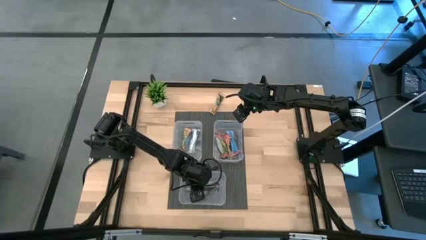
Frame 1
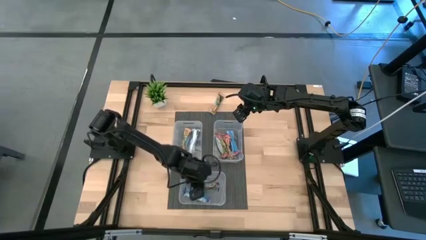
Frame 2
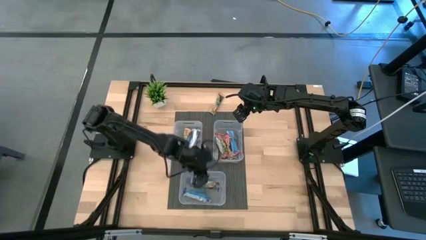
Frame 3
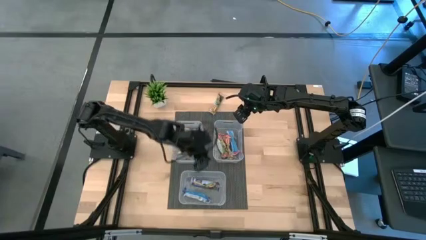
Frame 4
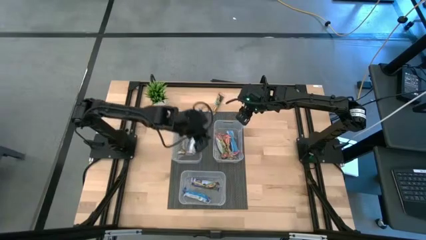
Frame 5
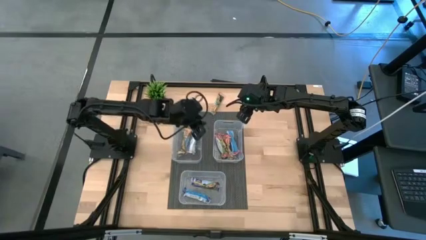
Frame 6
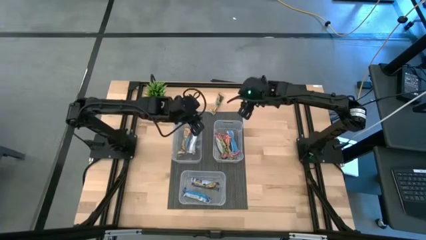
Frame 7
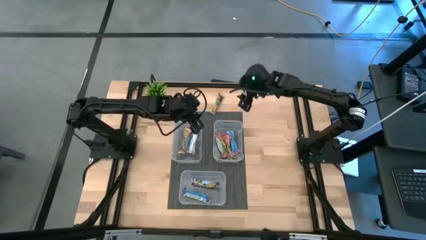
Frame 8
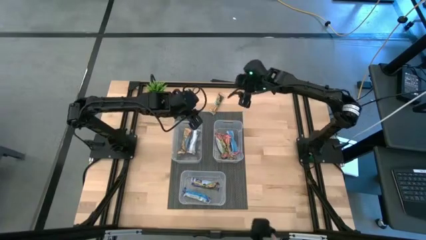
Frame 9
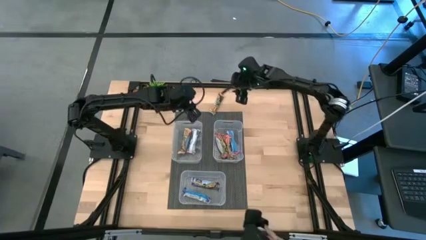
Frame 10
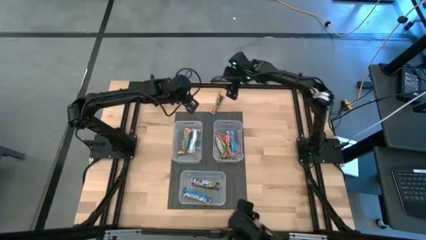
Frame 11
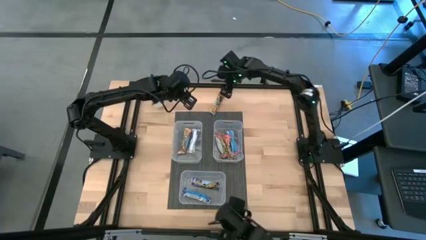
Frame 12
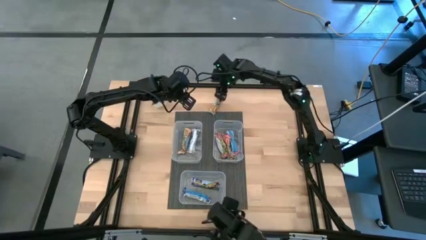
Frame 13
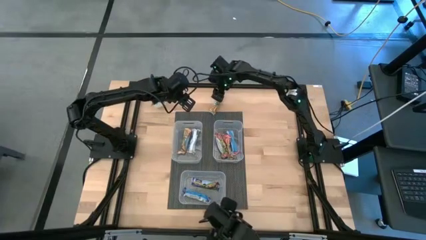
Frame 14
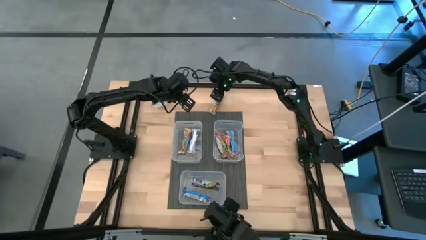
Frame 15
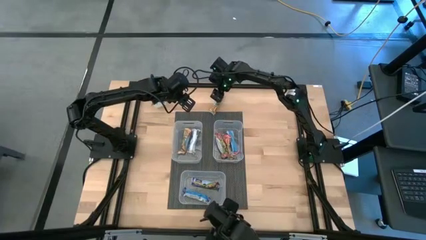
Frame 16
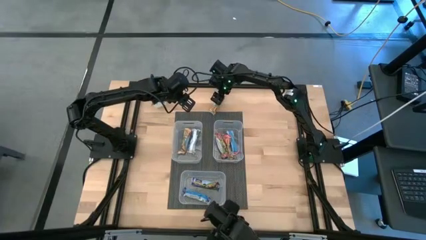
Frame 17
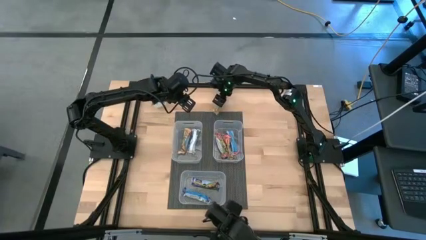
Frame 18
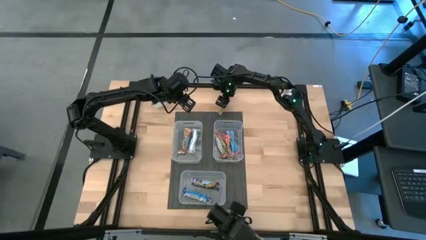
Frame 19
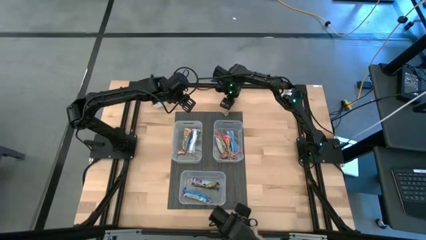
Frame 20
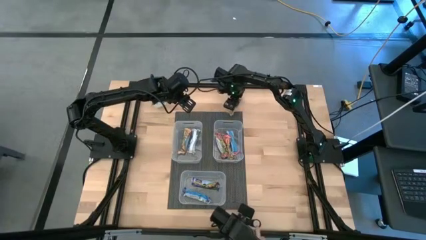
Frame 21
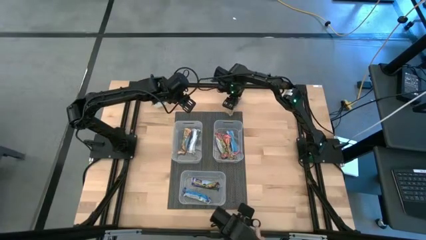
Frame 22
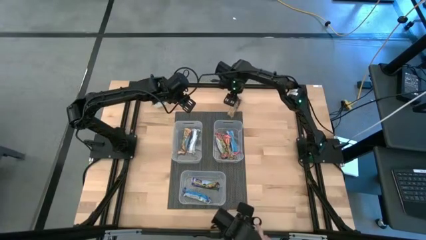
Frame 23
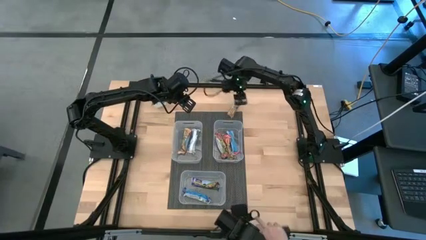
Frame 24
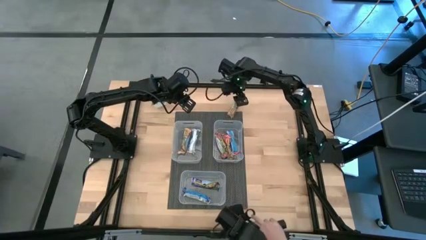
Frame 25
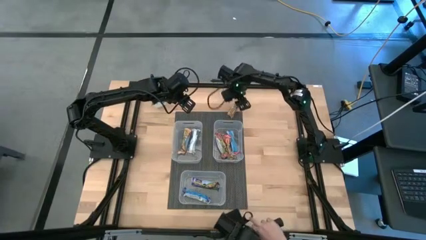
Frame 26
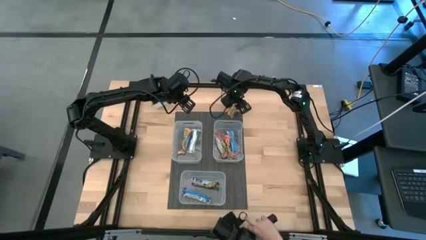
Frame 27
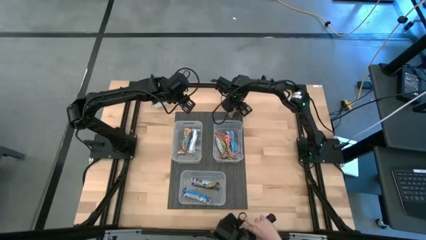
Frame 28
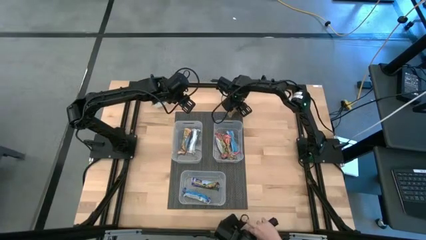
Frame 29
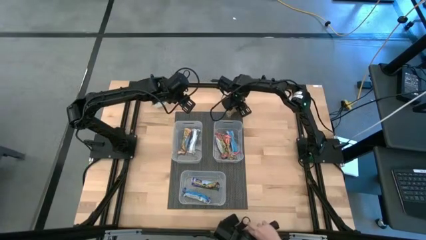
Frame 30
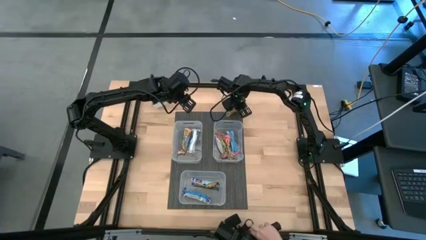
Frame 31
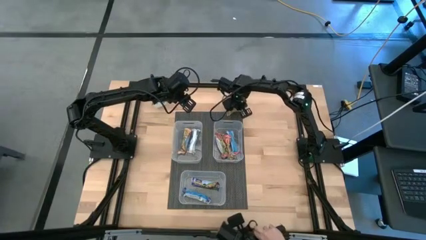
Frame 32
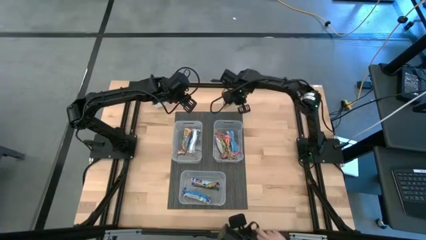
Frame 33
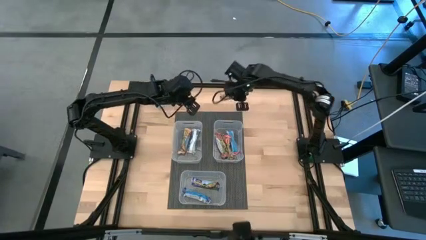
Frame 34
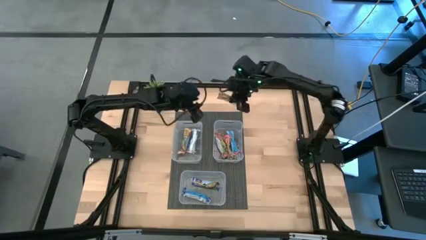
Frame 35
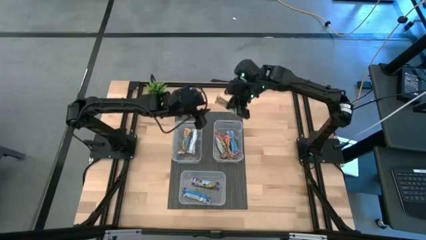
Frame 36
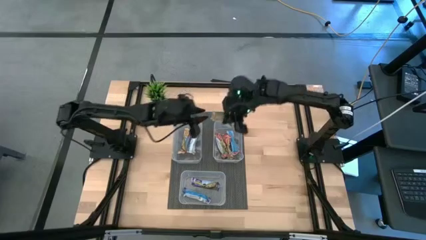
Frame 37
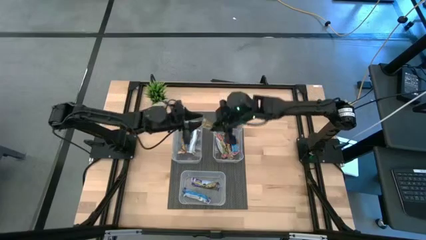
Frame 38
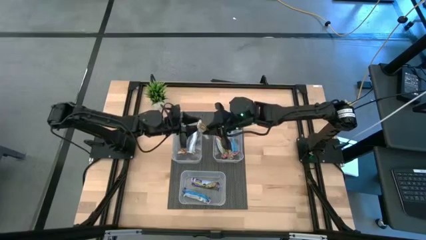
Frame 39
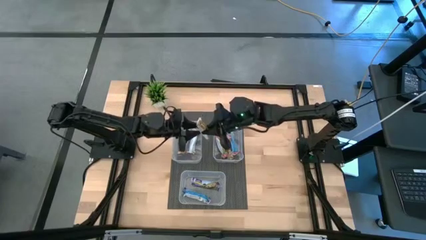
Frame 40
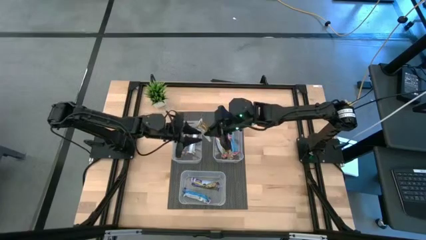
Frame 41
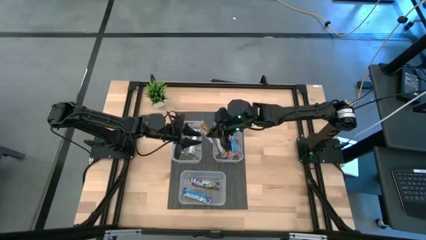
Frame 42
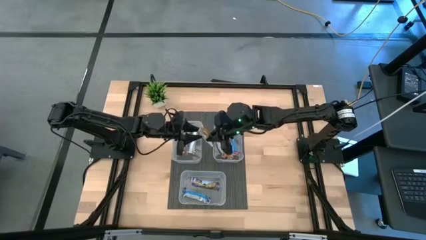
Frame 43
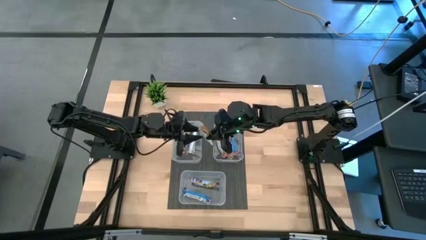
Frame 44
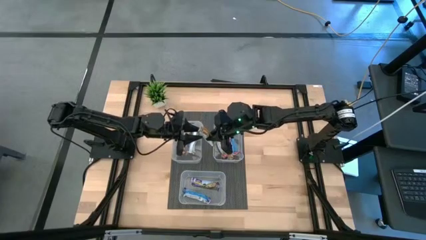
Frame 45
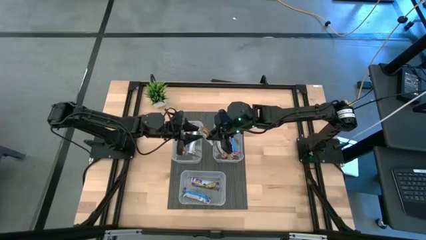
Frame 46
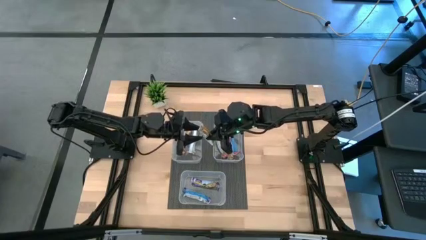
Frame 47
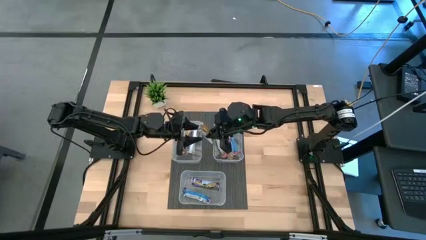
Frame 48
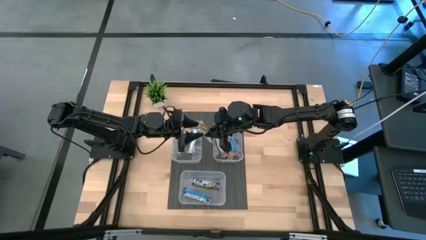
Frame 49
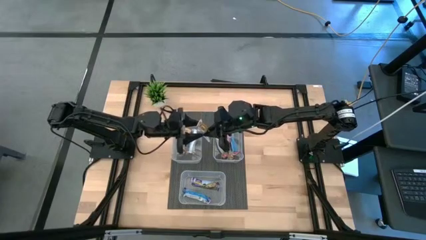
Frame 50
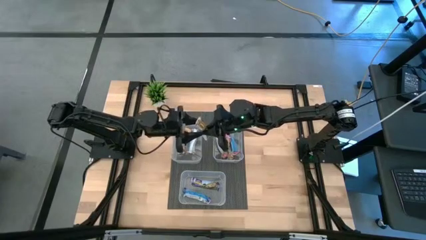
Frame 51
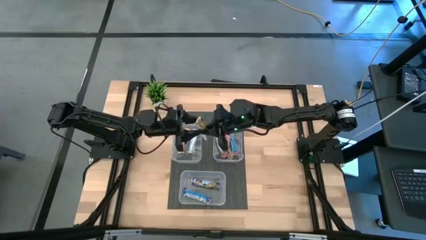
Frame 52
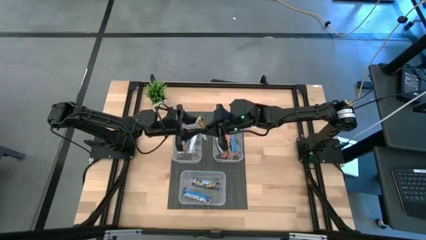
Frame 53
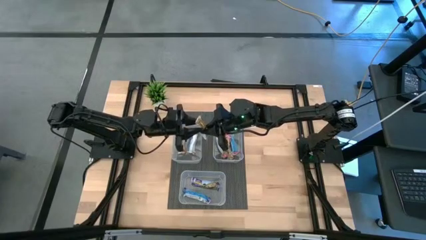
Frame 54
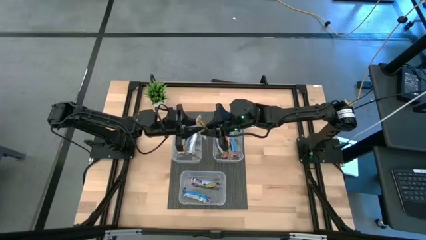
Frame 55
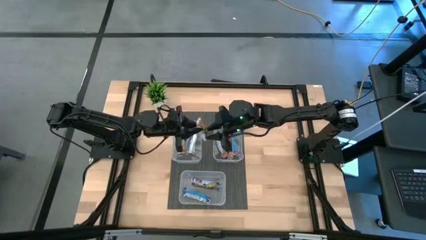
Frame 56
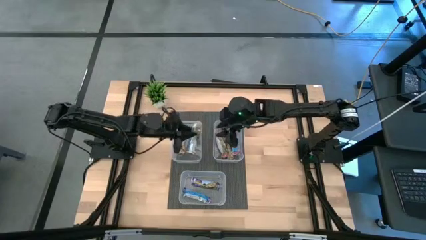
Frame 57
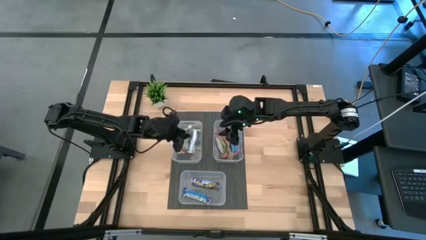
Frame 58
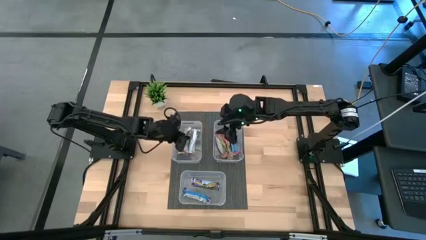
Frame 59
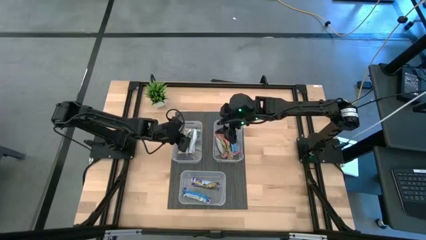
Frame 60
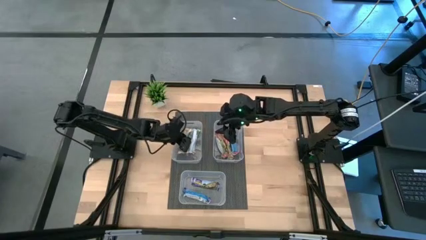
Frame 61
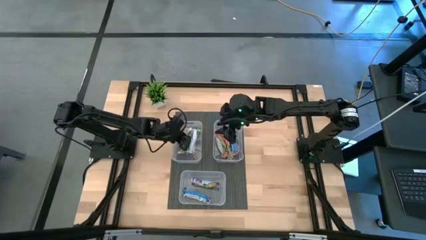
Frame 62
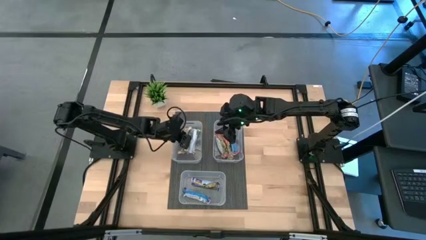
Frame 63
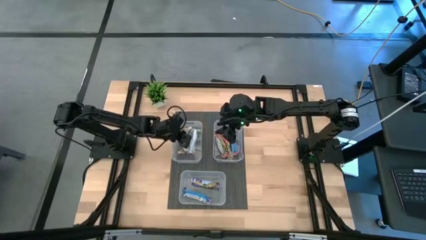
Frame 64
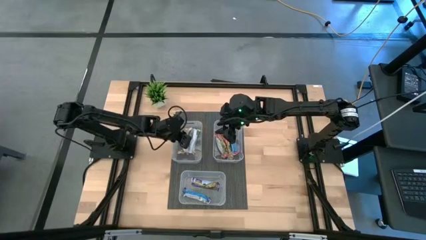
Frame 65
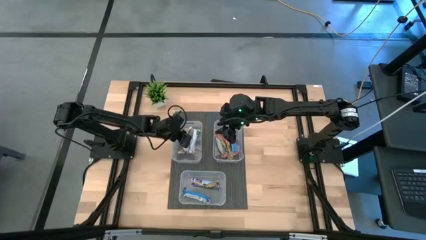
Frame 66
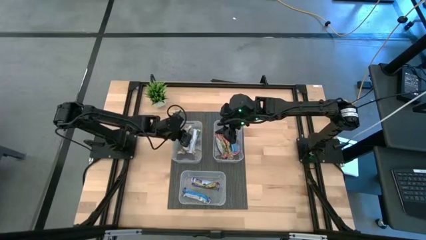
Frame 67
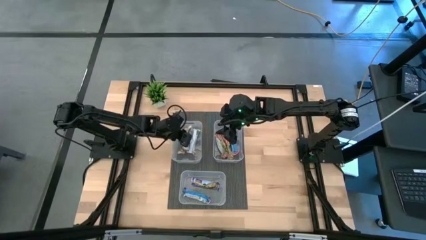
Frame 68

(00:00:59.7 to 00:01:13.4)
Task: Pick and place Granola Bars by type
Put the yellow granola bar into the top left transparent bin

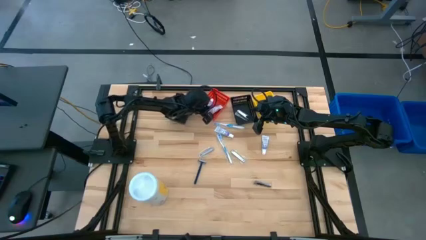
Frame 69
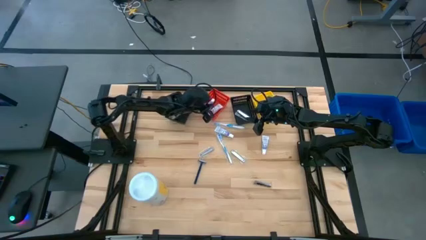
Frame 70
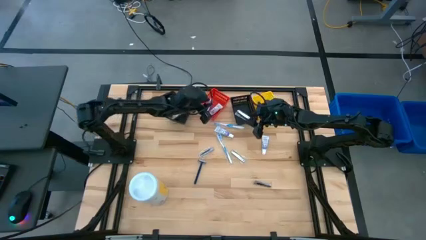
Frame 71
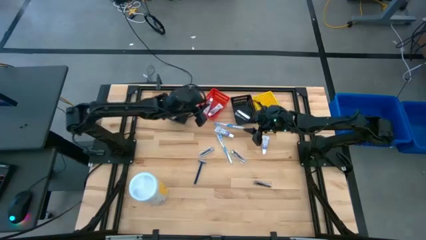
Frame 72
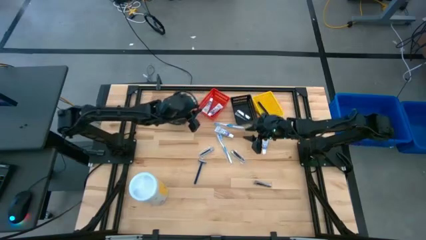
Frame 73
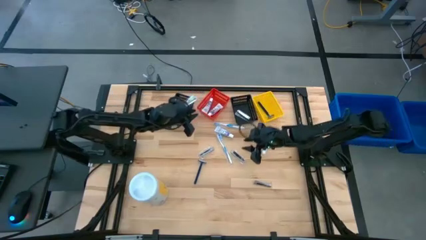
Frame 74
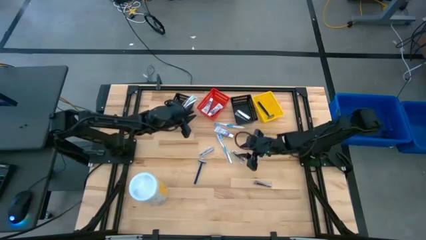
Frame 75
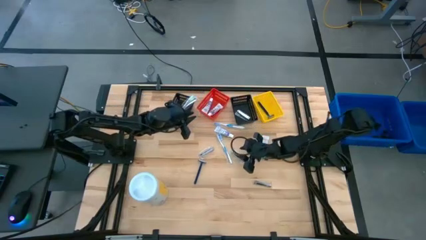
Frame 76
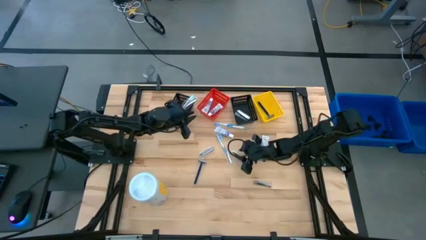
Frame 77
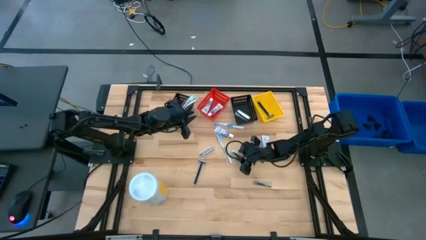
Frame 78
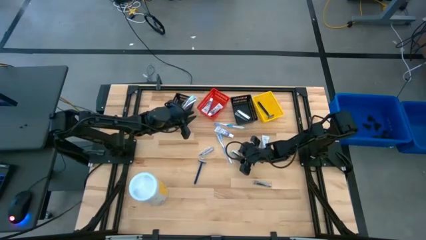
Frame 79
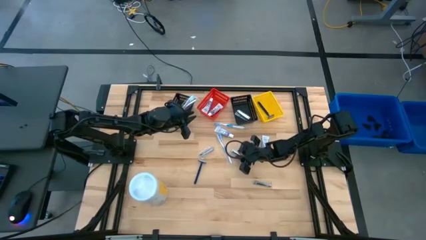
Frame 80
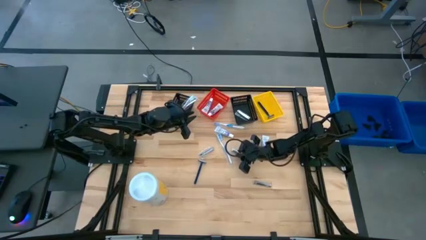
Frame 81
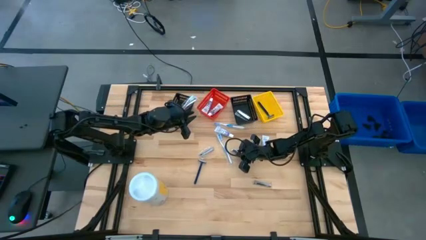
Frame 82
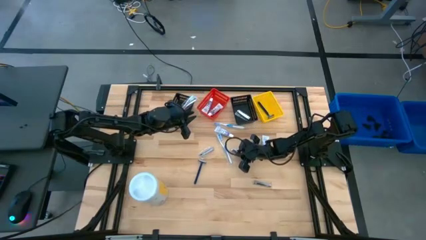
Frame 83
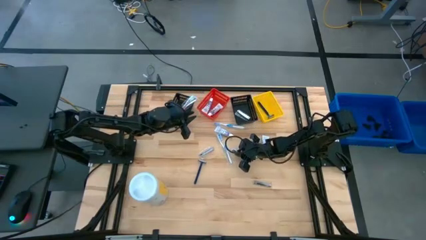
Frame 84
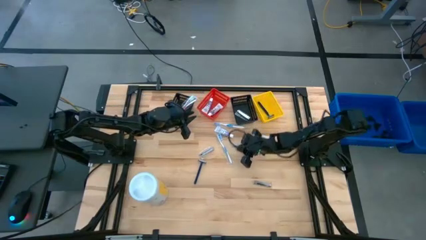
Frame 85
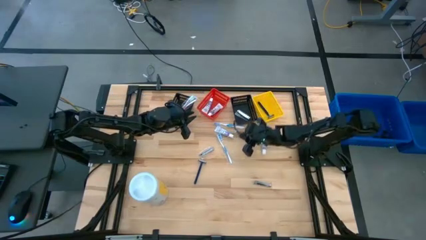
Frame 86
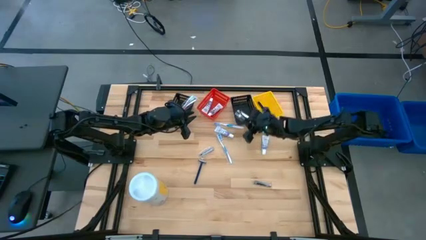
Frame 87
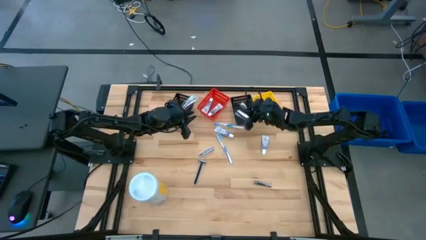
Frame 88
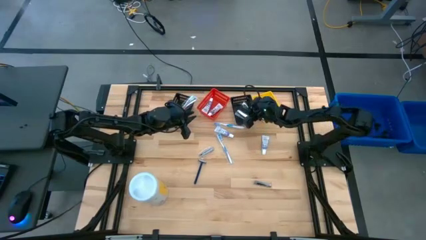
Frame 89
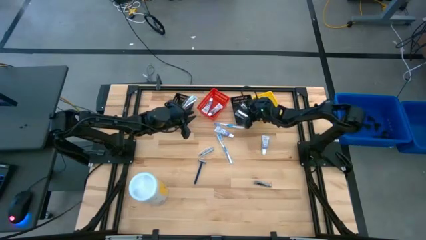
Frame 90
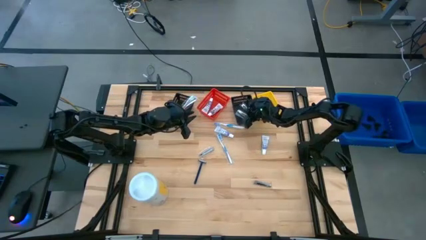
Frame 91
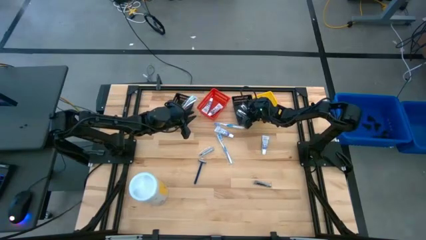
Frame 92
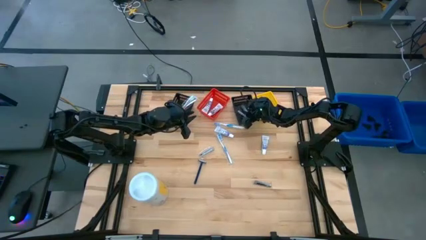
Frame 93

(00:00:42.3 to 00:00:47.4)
Task: Pick & Place Travel size toiletries
Put the nail cutter into the right black bin
